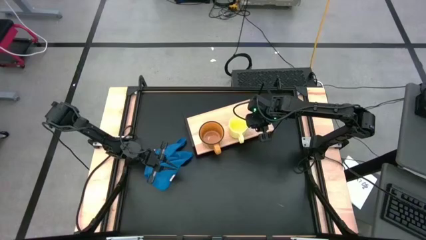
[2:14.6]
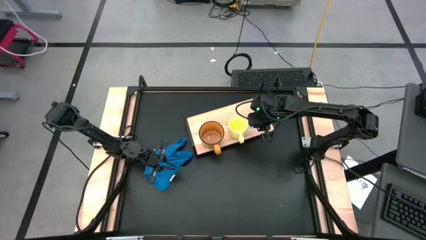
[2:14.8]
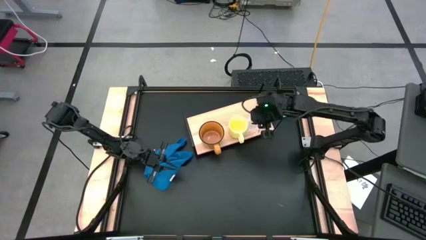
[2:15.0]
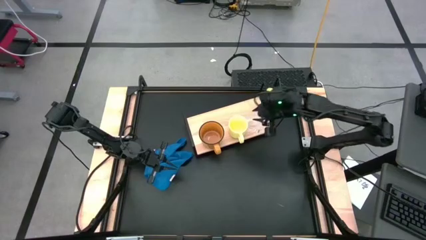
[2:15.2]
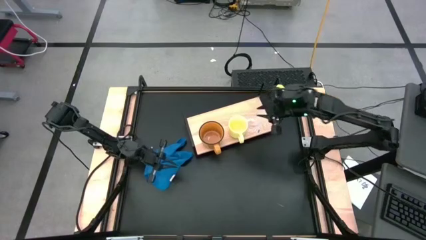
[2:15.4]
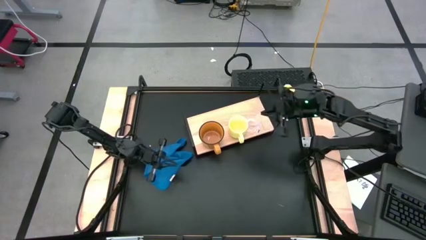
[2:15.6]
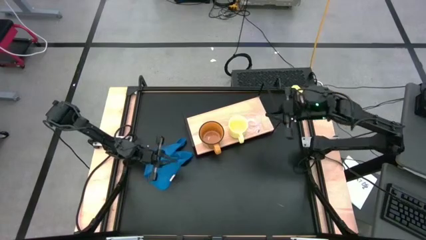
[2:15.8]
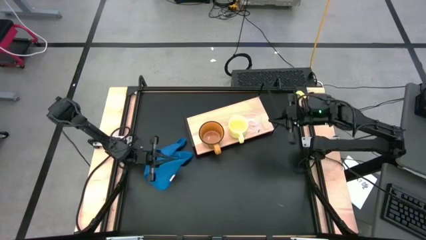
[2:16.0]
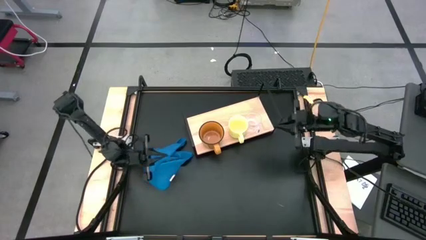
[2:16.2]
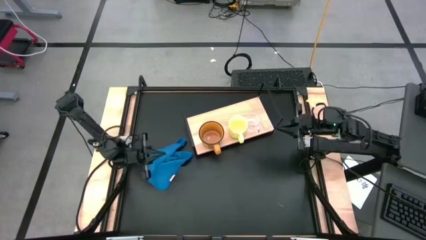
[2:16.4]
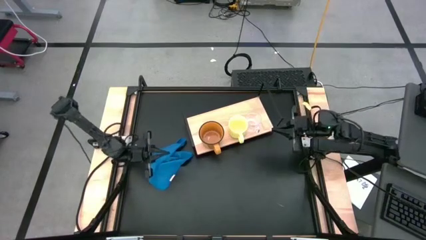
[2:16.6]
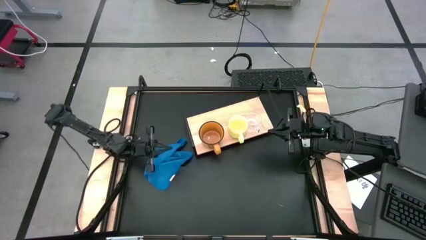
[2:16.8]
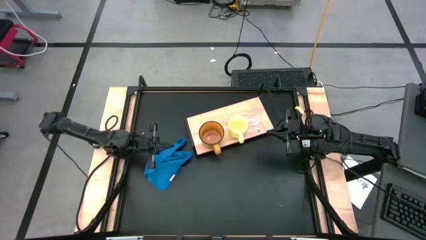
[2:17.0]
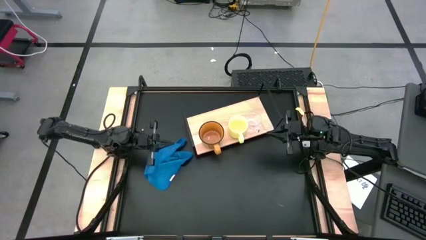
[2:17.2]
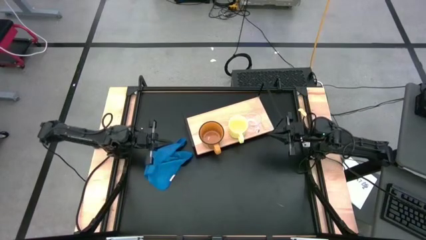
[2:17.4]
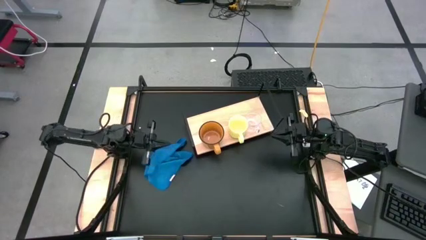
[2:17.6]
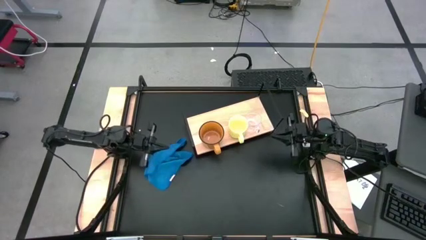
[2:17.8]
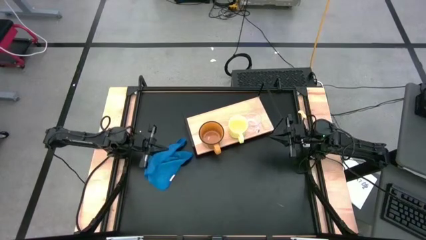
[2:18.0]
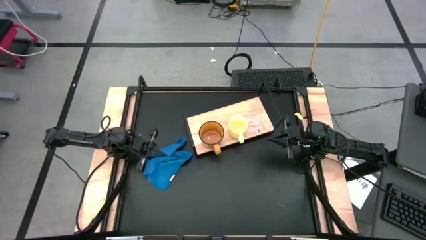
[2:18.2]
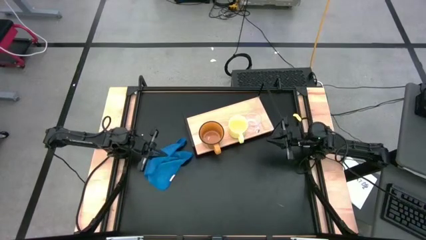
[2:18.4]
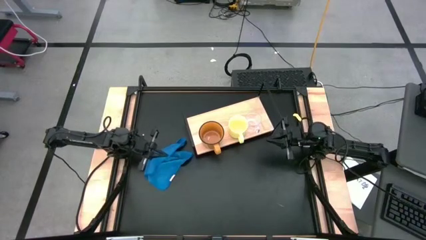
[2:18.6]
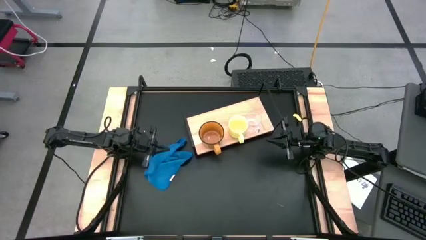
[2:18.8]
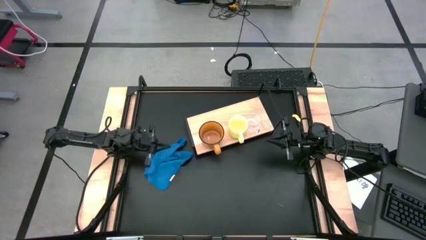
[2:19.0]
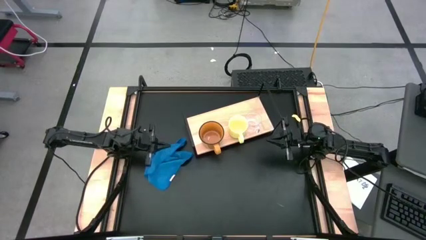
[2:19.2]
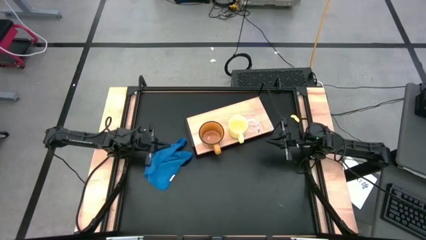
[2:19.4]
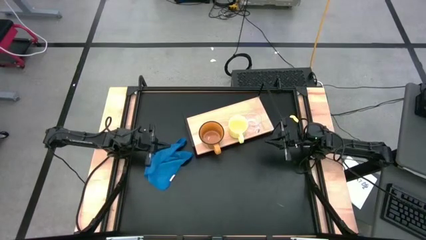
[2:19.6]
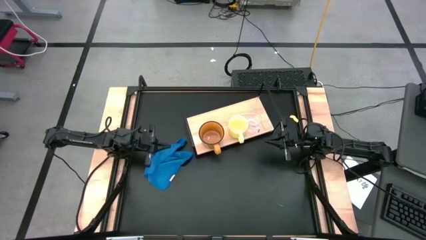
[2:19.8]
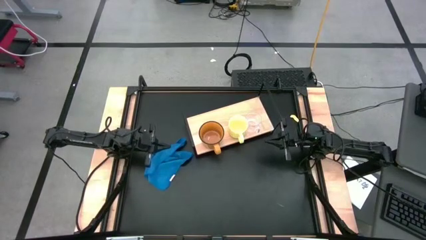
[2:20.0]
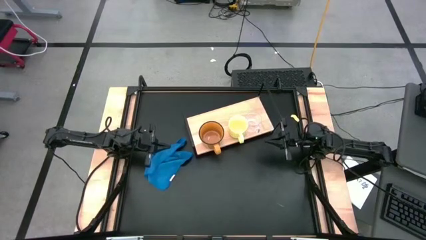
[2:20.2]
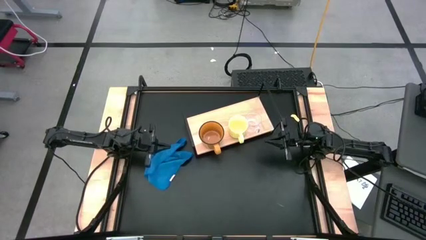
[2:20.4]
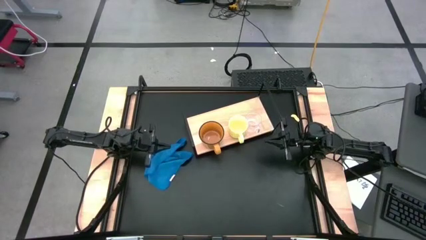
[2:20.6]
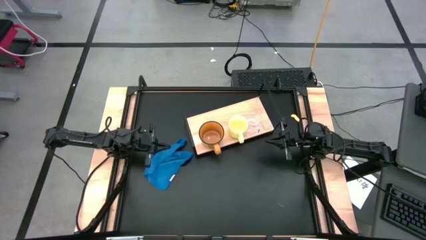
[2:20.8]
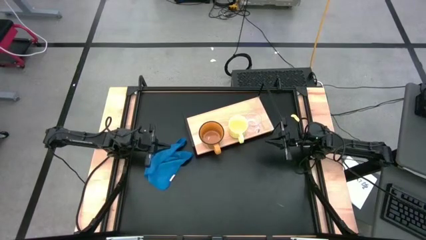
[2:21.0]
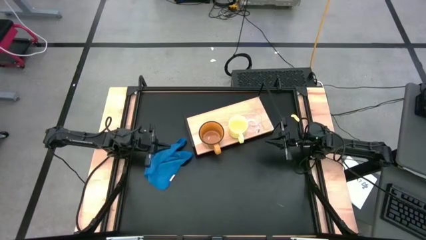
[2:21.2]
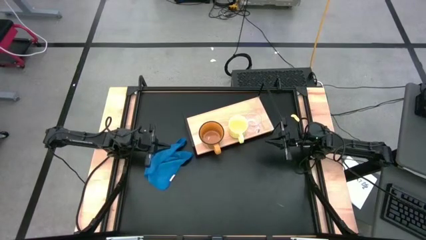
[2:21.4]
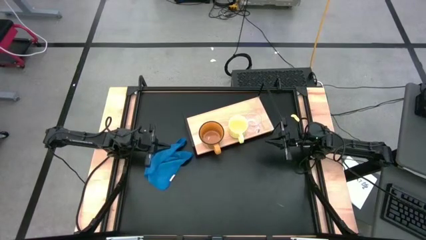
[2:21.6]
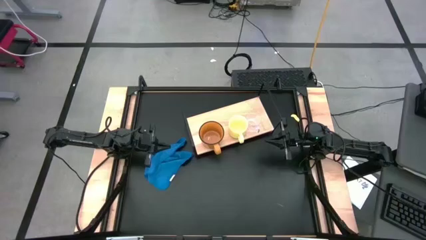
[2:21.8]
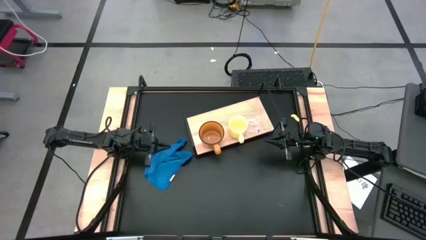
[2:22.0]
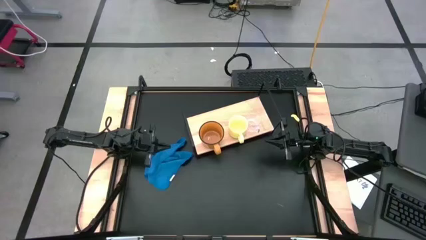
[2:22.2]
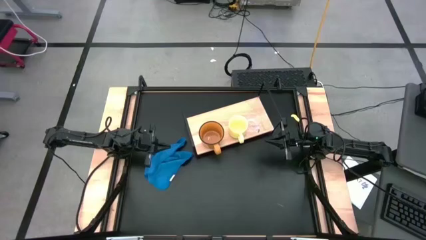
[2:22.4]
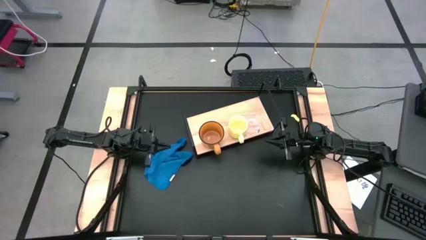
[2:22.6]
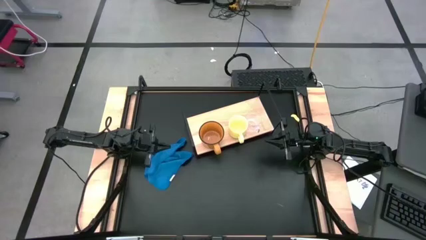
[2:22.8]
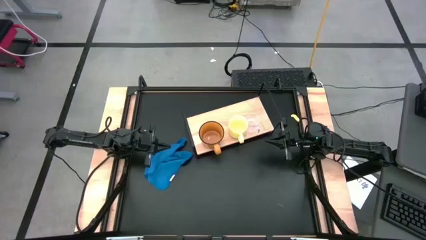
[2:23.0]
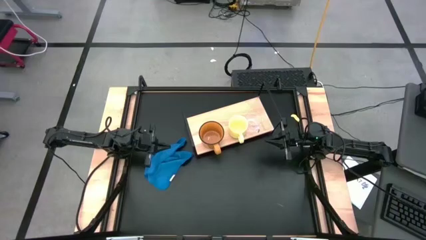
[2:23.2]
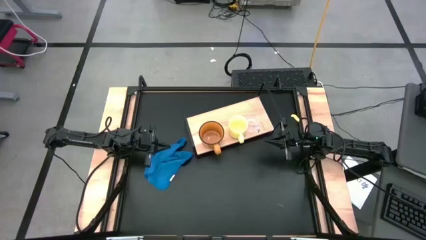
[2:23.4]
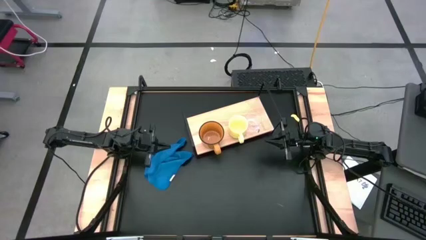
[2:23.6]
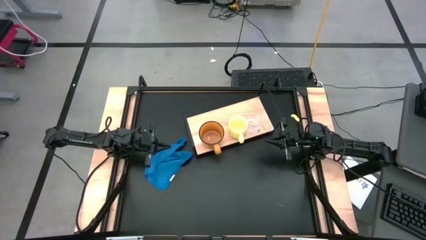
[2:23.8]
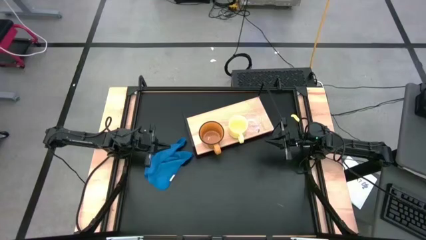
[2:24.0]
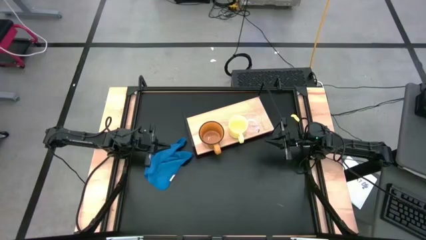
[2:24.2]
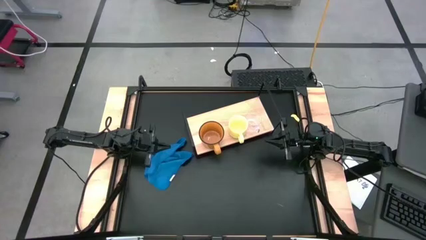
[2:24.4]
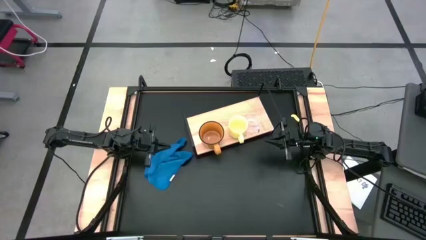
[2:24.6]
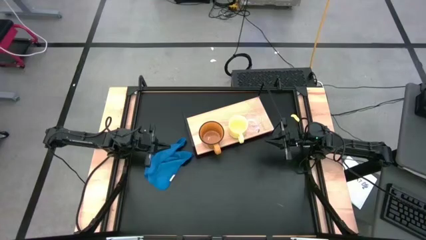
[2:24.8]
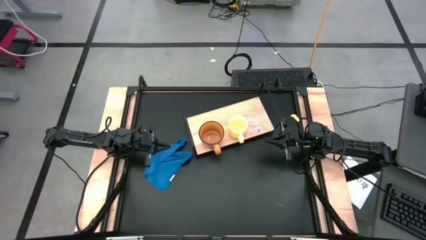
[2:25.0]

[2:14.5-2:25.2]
Task: Stack small to large cups/mugs on shelf
Return to Home Position

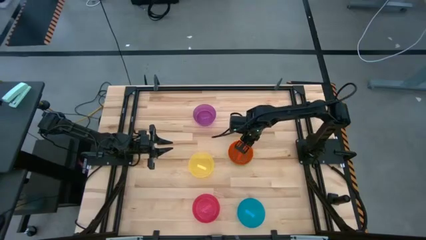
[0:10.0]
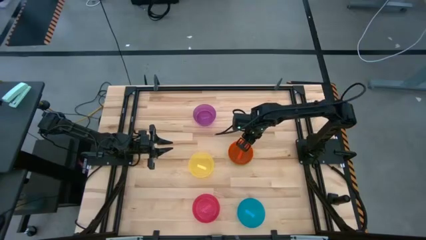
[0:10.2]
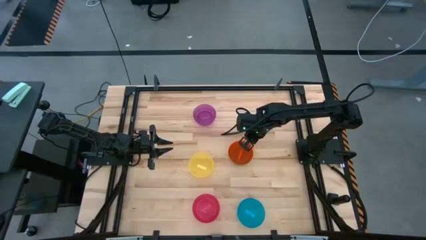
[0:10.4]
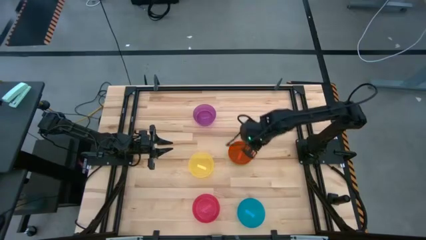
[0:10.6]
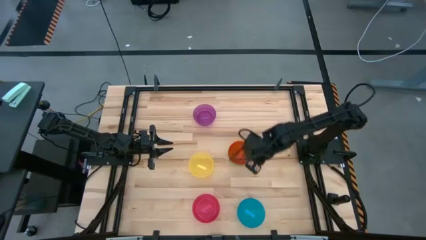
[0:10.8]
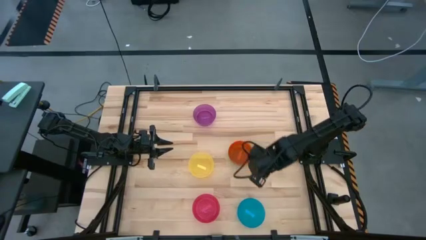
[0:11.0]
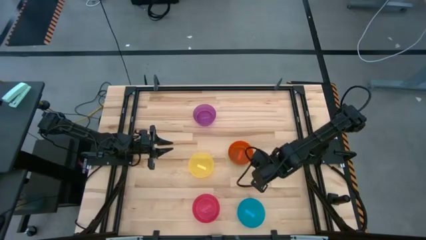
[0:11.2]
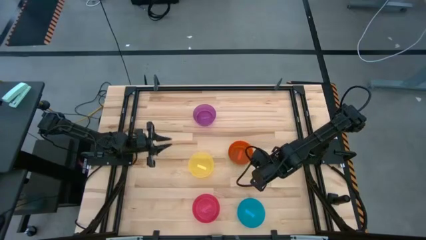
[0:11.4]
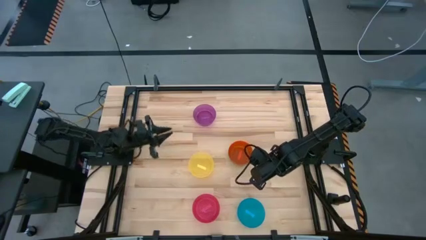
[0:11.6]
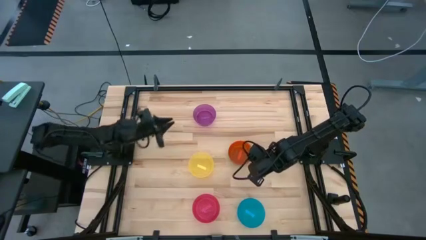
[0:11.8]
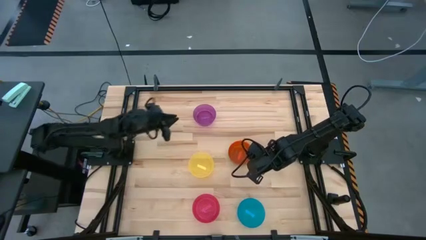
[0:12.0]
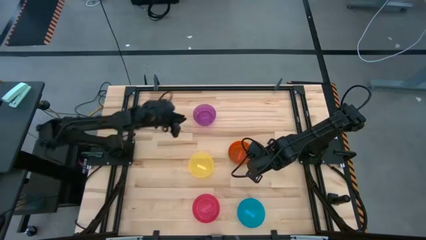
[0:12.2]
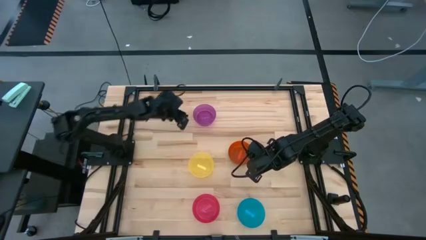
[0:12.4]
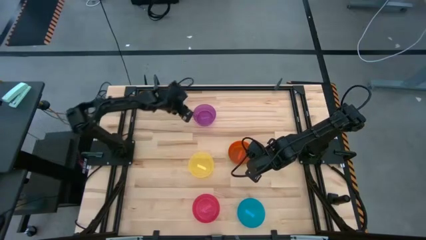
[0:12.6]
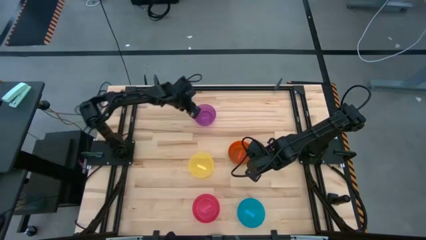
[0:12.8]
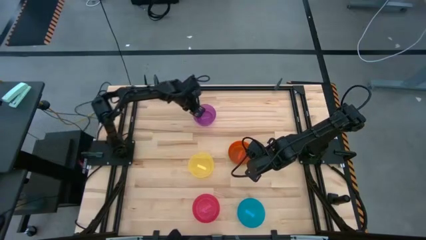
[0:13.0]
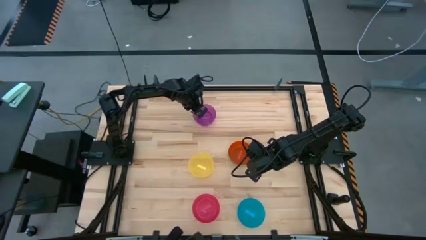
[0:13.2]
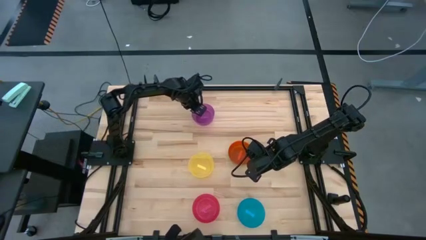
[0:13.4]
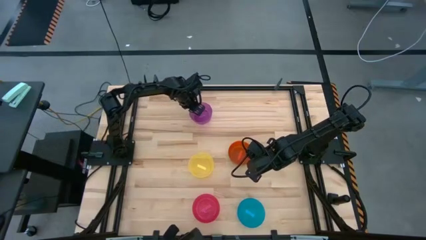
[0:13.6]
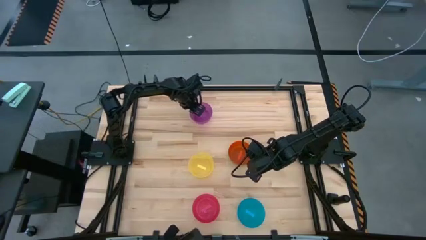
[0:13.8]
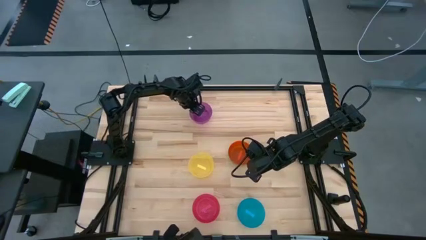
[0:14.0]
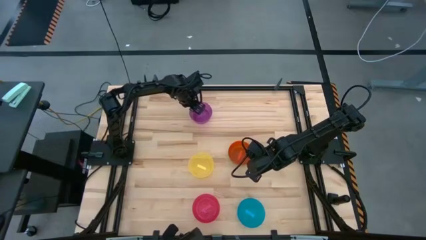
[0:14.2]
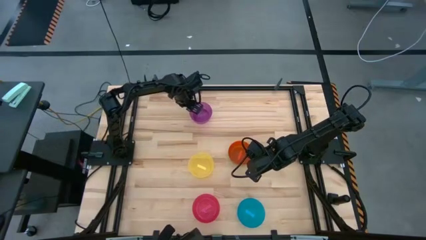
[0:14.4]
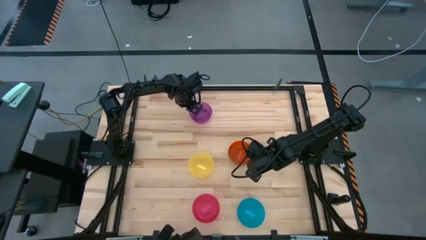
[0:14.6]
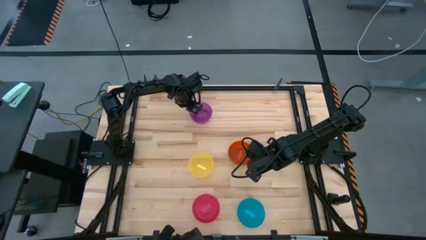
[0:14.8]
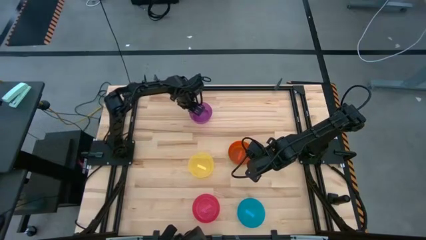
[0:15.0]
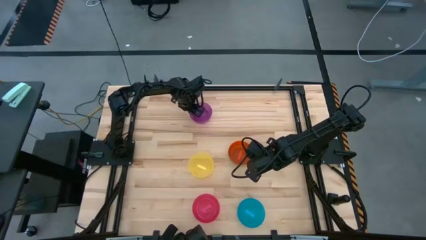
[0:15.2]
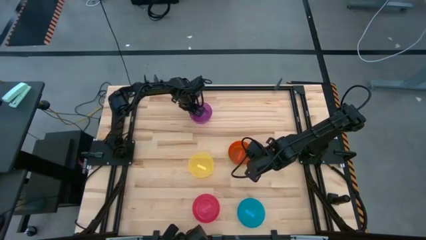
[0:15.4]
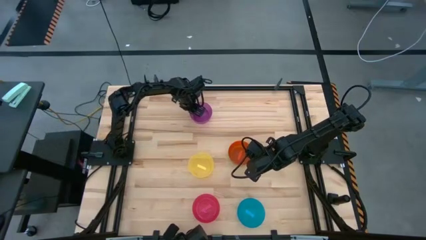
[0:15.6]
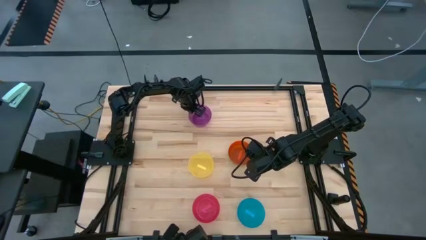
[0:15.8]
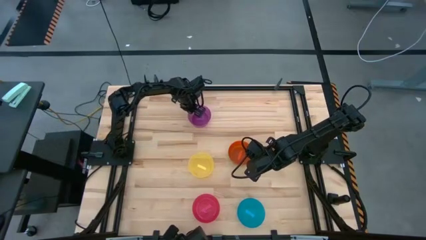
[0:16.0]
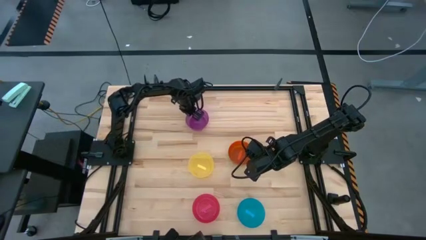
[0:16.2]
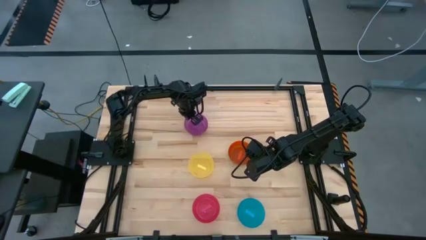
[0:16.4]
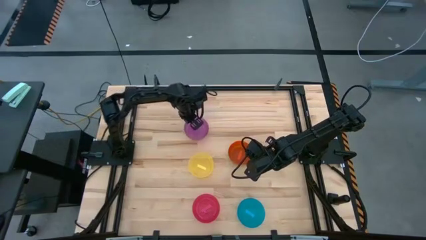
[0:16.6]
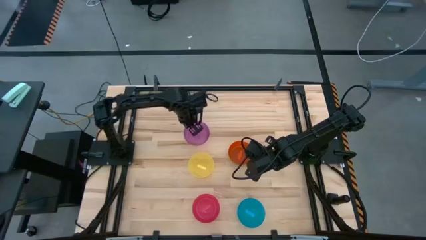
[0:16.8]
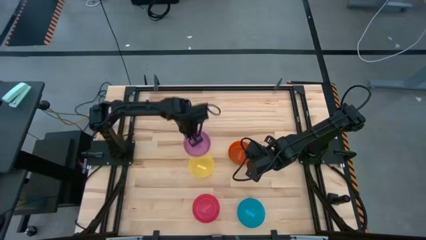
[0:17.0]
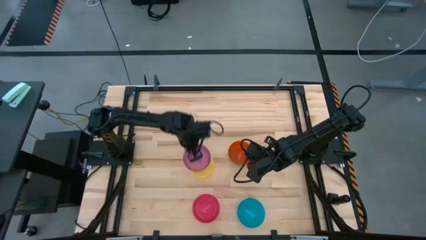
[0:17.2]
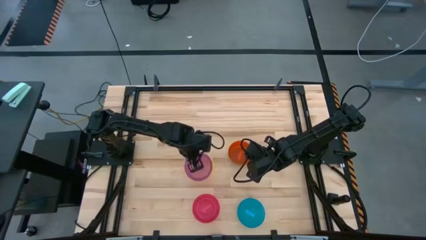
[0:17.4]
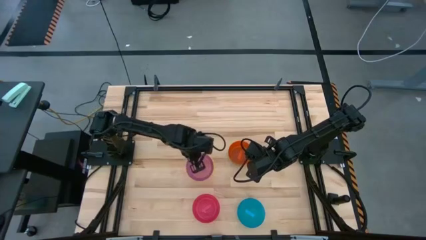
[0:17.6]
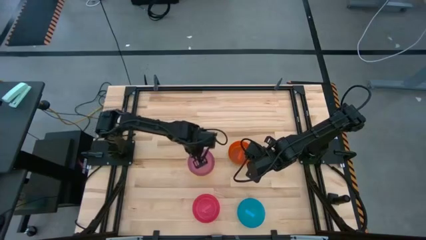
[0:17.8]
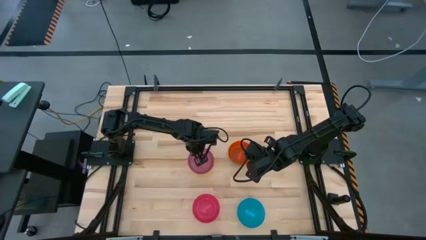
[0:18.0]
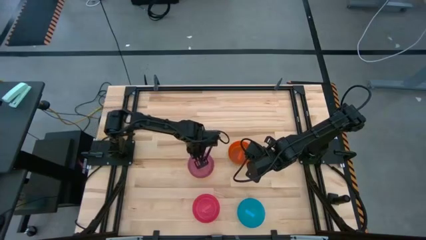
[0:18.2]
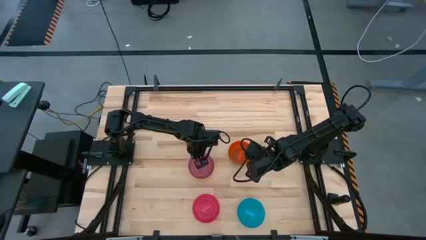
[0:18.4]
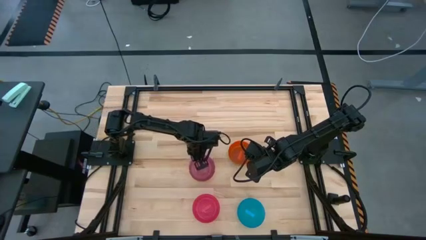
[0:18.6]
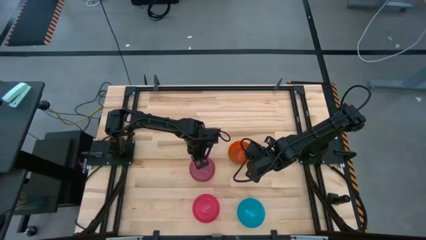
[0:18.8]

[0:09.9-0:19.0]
Task: Nest bowls inside each other
Stack the violet bowl on top of the yellow bowl
